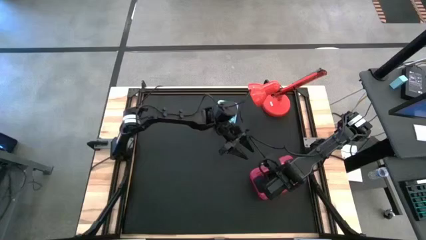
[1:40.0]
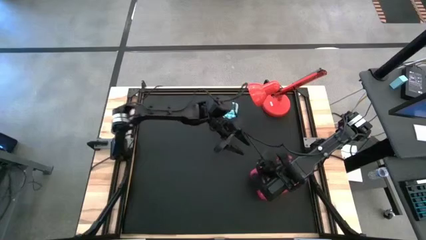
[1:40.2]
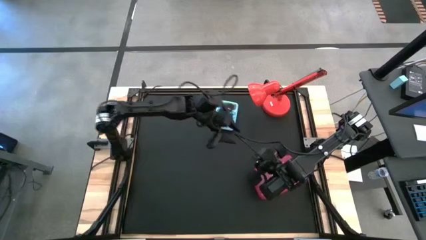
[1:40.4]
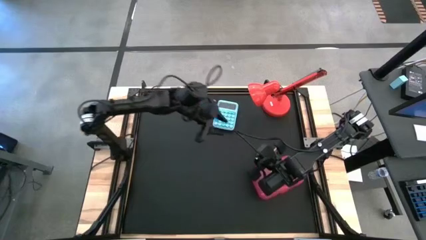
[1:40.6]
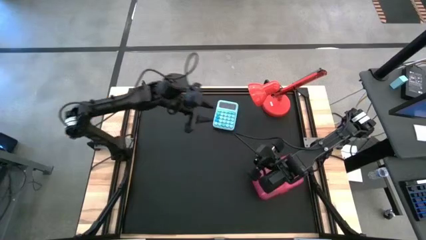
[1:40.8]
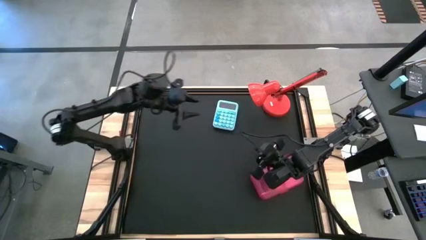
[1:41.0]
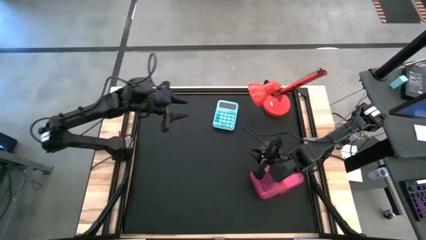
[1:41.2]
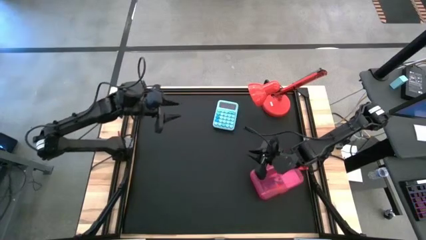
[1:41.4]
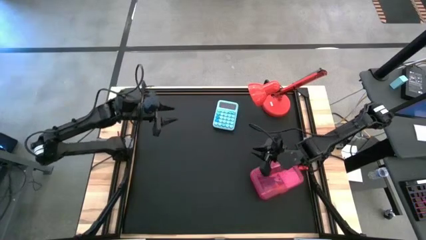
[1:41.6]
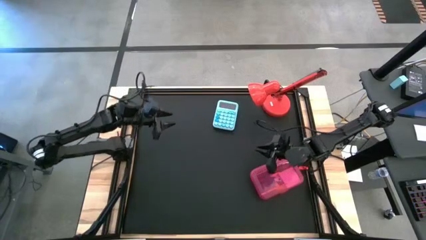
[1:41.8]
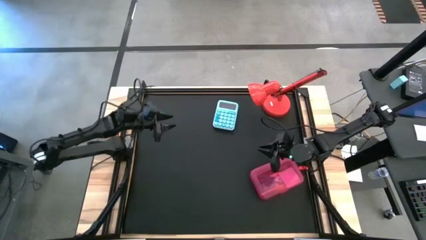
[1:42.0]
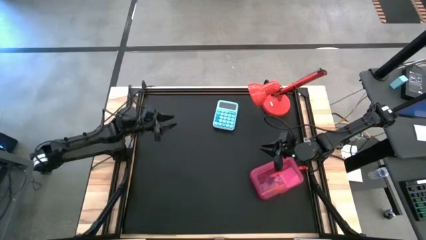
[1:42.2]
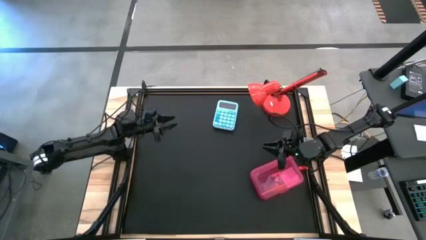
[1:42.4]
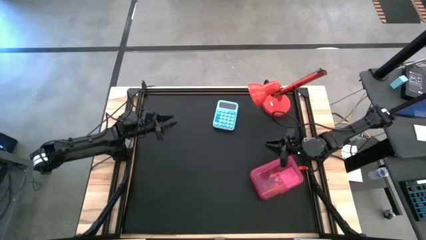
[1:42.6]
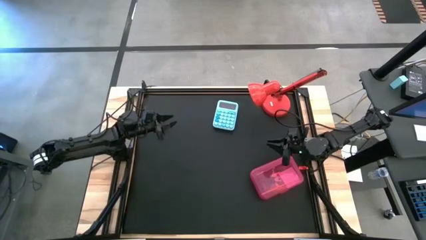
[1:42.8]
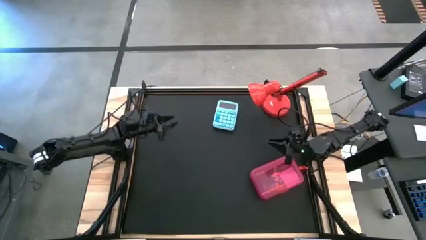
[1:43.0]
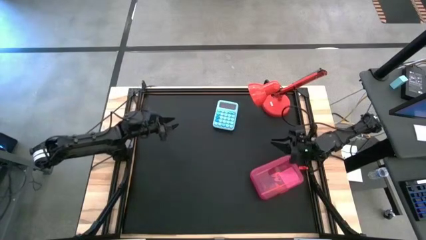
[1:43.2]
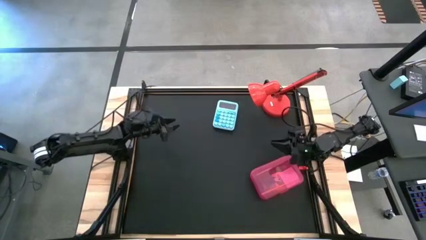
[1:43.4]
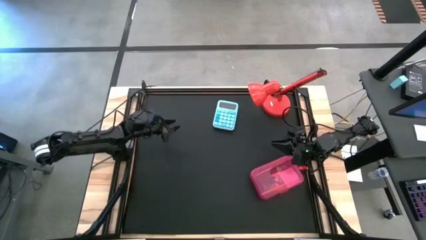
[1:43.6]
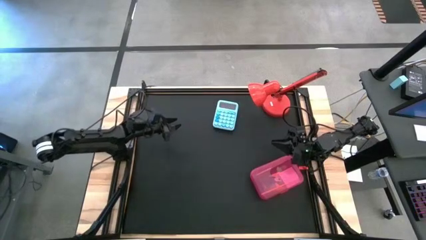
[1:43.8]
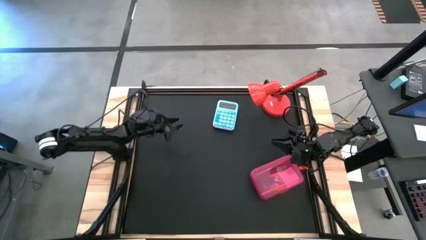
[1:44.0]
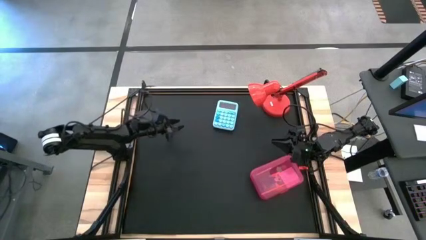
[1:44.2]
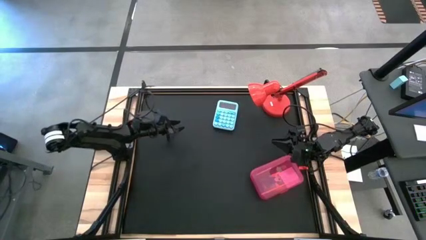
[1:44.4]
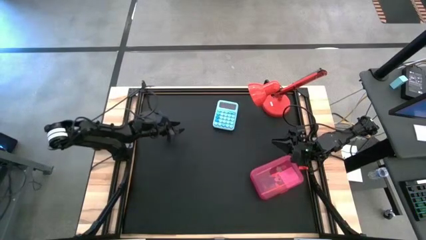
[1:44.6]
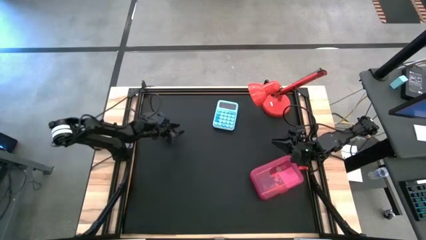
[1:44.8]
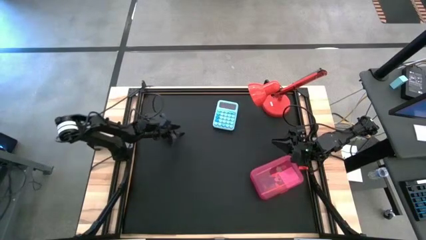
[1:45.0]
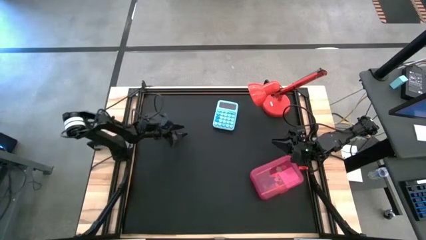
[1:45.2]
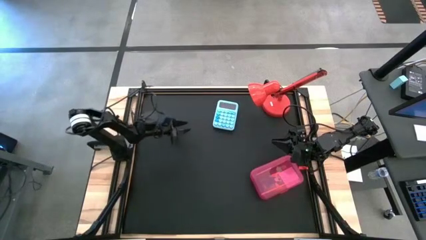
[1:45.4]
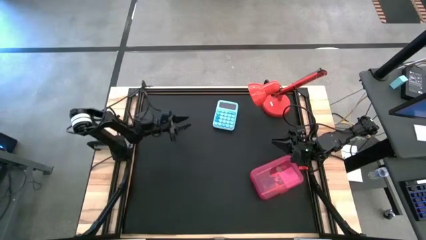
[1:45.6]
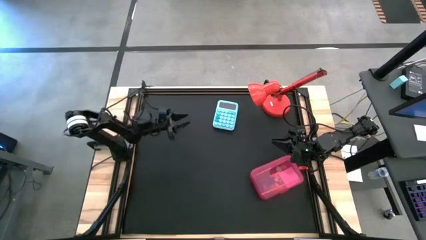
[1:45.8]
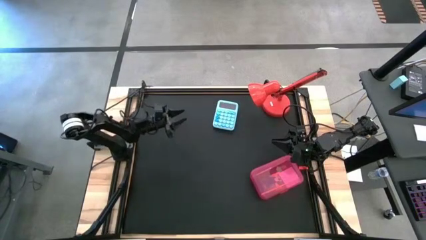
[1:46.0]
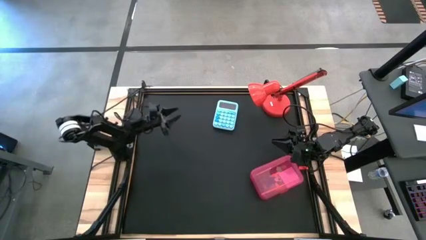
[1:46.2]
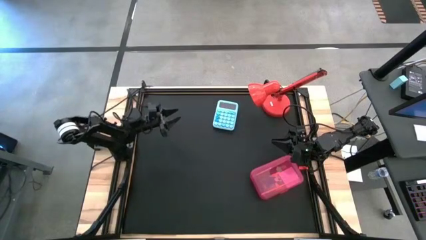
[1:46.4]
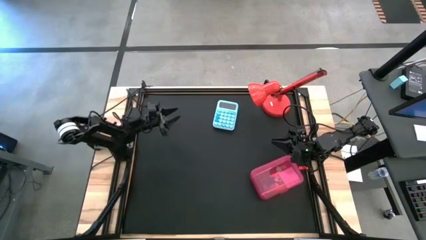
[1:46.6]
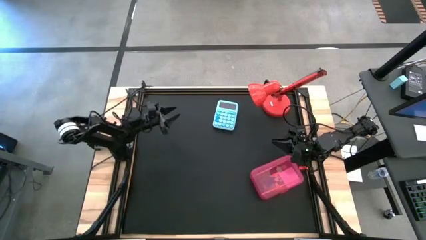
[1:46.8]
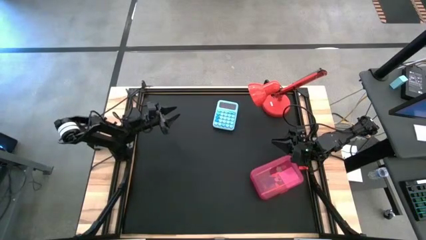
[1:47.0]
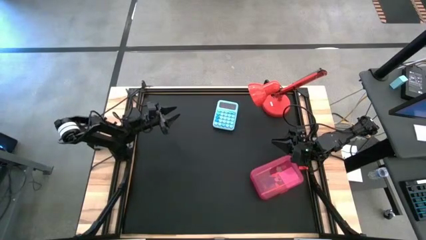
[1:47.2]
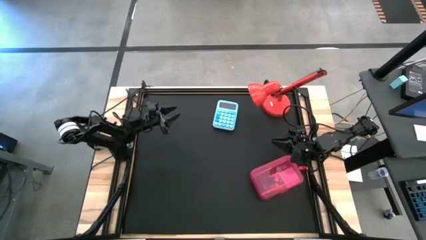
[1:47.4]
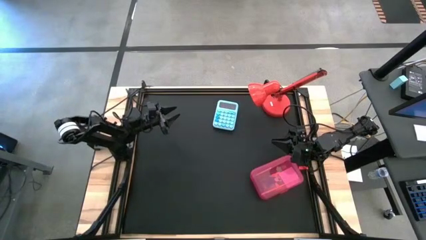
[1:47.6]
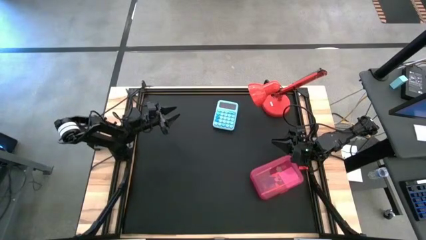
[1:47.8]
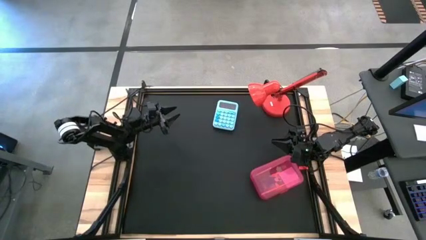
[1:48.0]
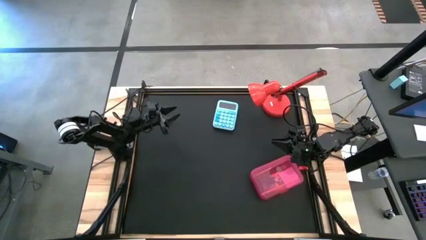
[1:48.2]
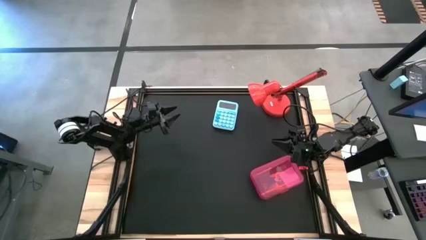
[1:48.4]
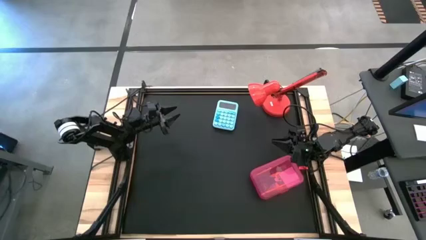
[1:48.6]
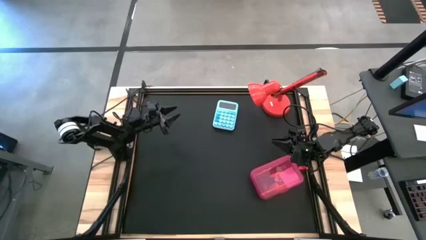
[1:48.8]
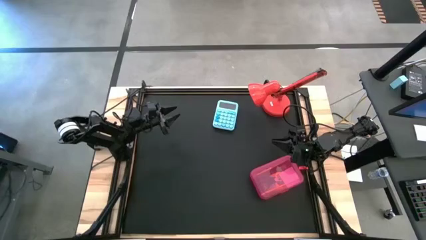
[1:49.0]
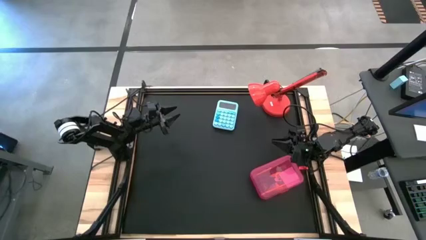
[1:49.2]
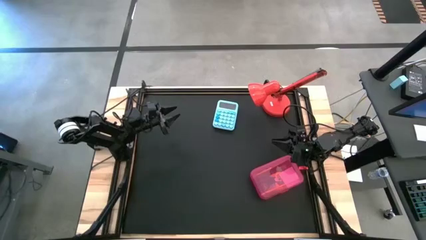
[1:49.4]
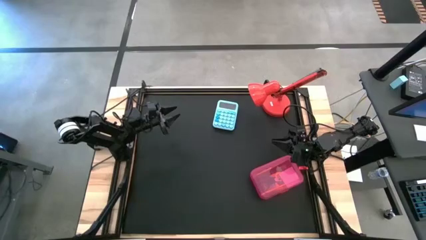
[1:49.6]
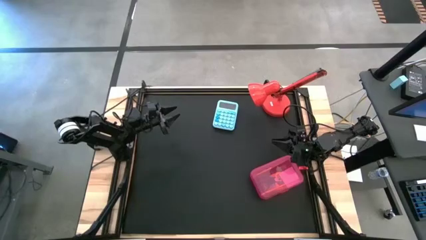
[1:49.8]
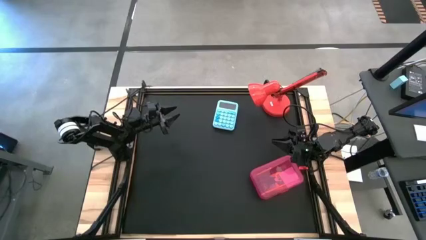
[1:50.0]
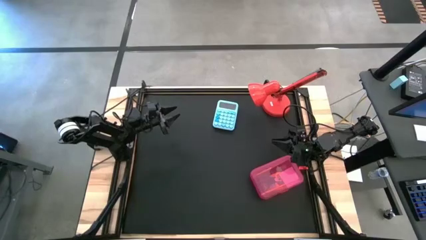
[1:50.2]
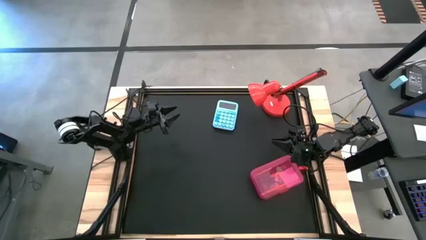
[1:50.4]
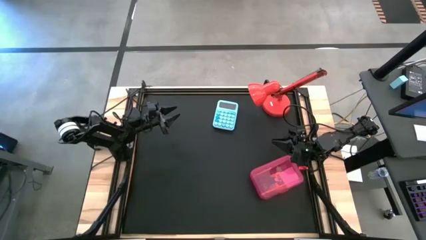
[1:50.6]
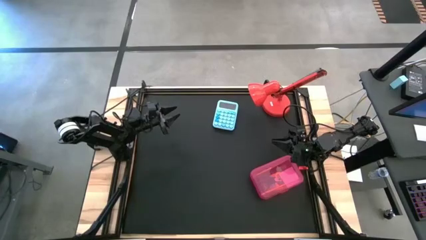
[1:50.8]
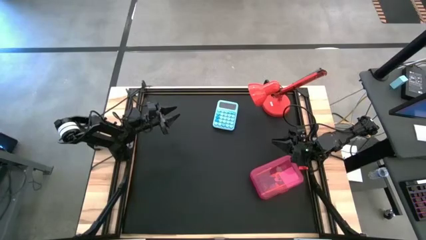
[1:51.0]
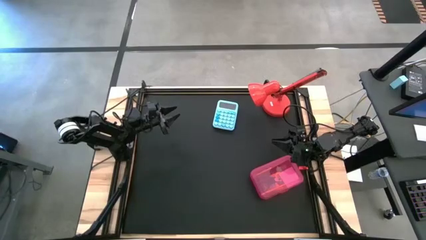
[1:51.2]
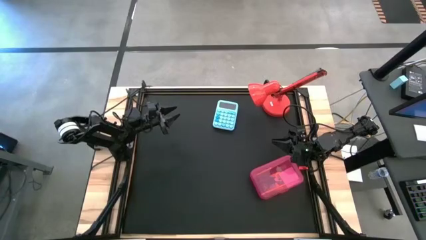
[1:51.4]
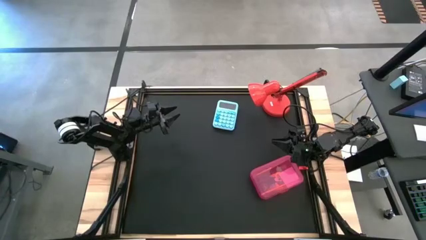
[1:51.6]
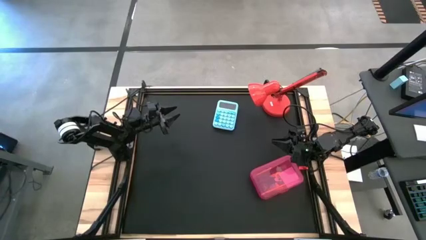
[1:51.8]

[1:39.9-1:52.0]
Task: Pack school essentials
Return to Home Position
